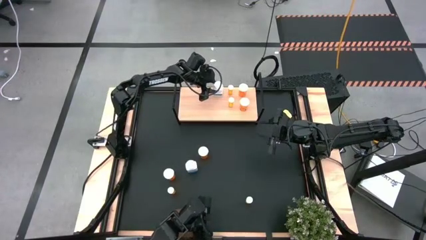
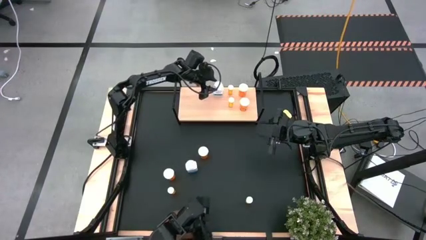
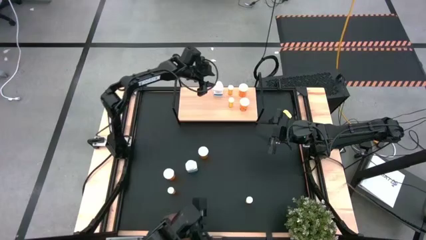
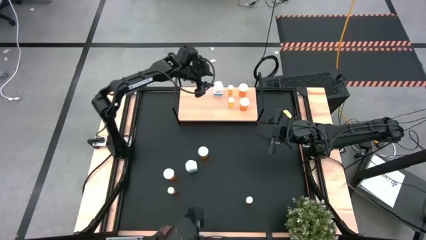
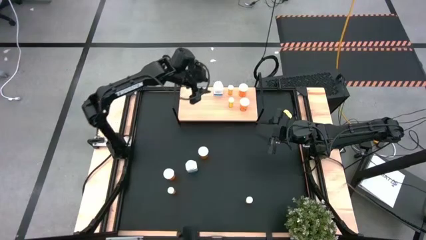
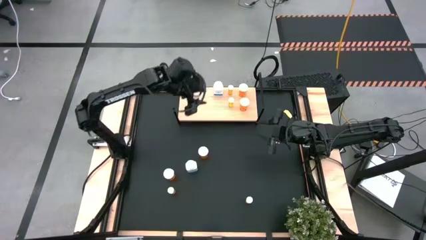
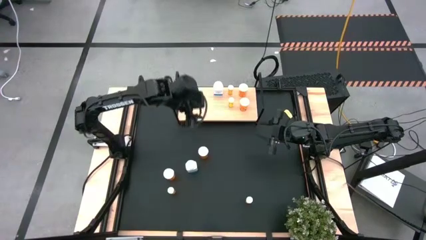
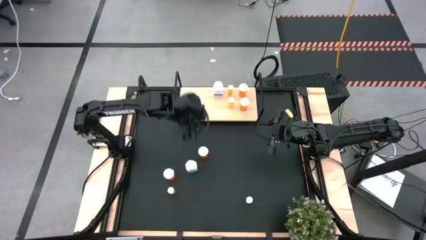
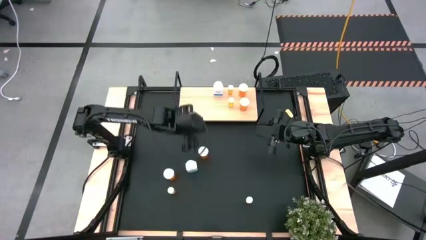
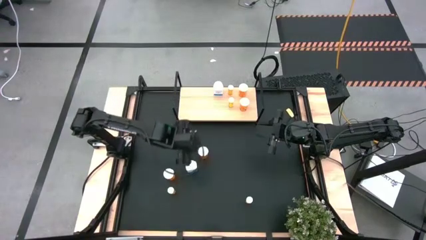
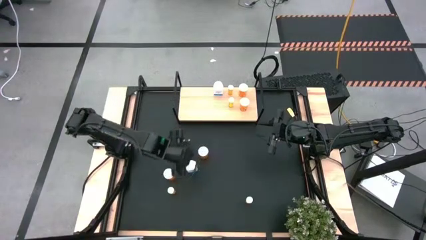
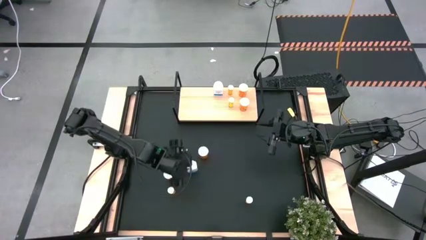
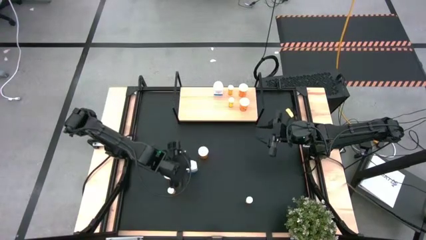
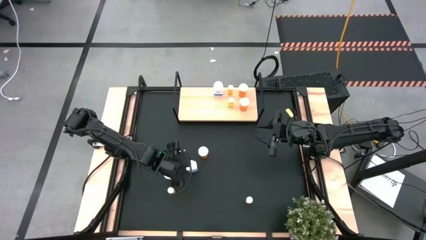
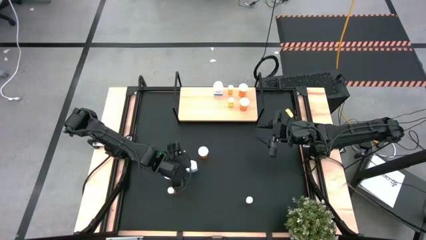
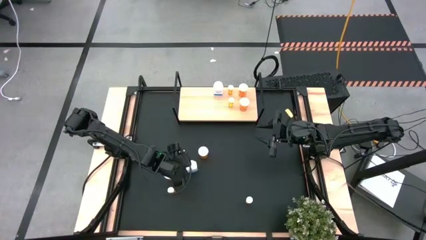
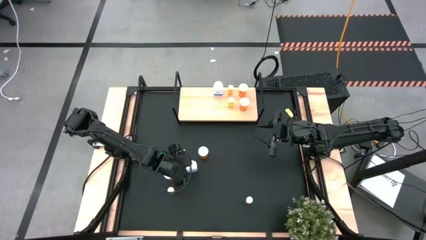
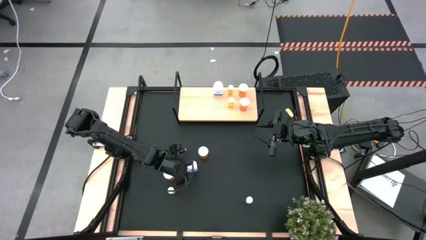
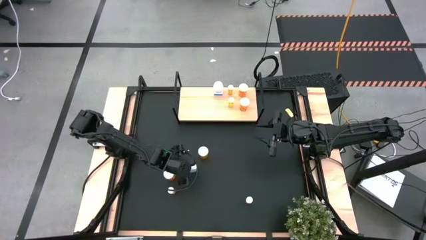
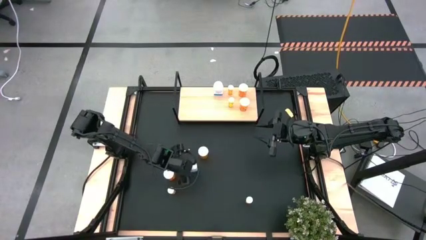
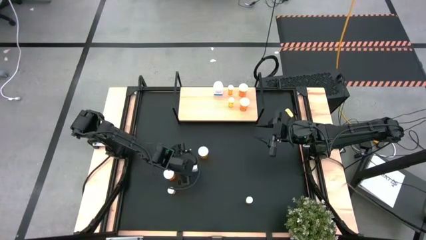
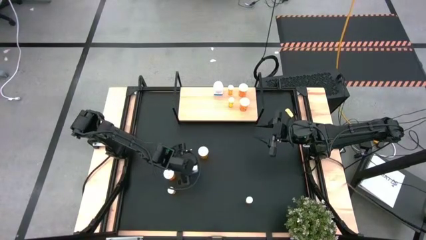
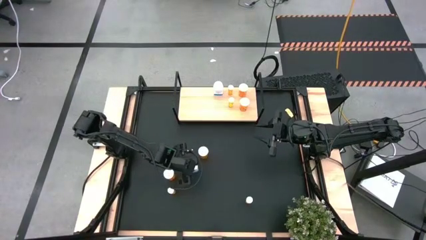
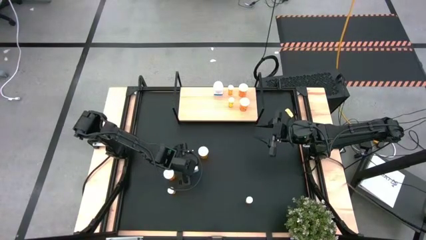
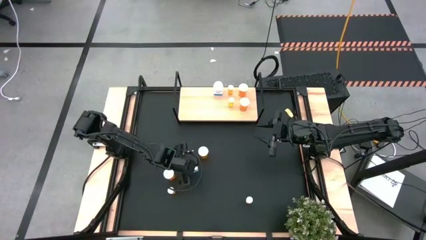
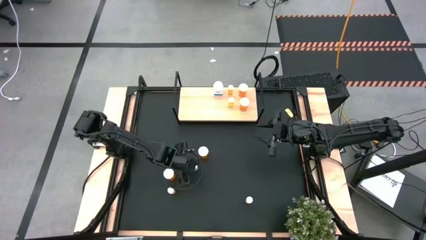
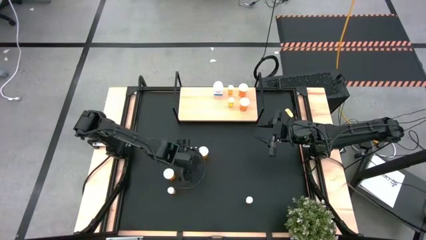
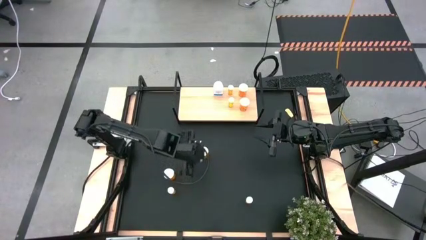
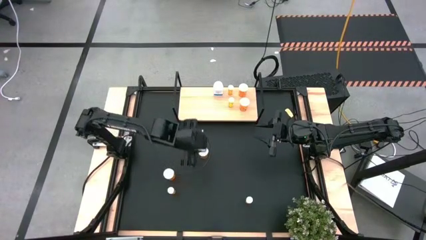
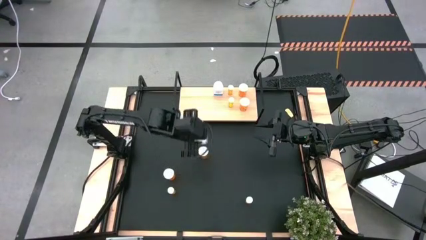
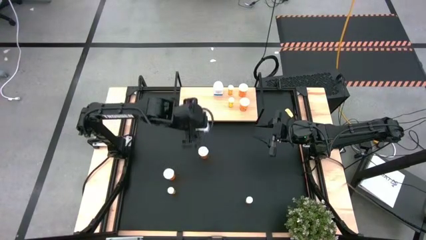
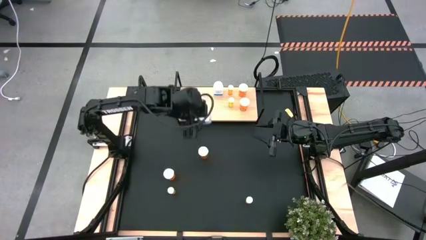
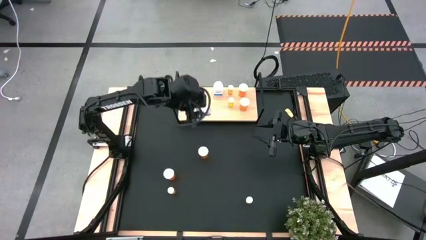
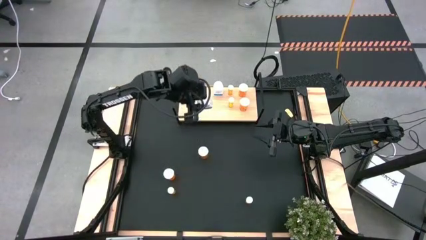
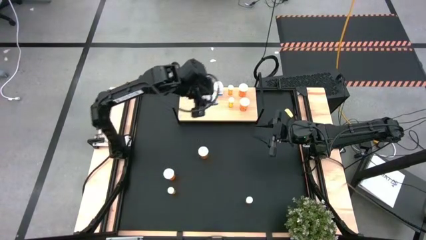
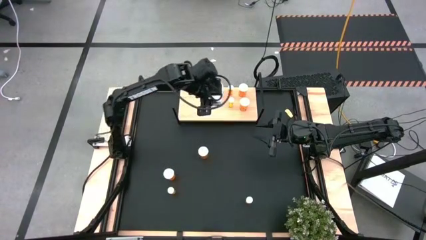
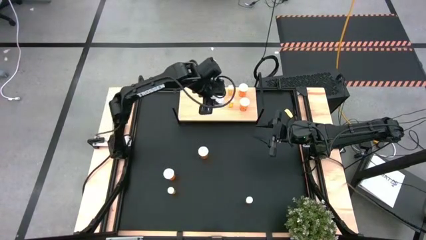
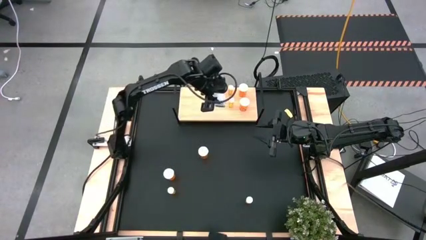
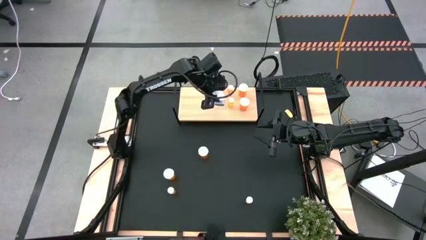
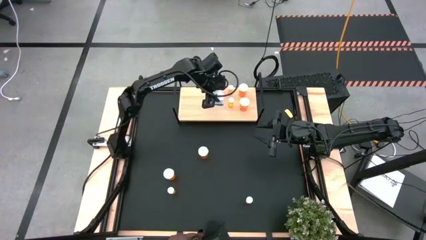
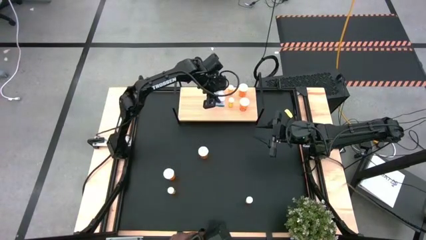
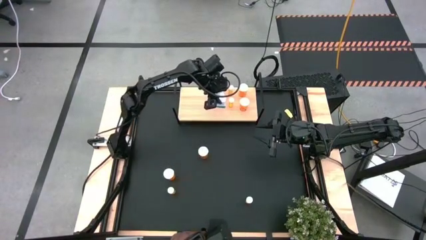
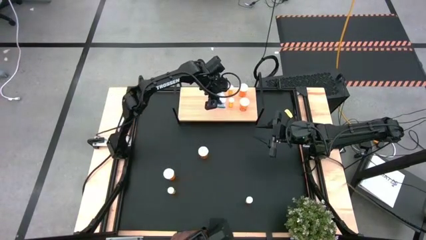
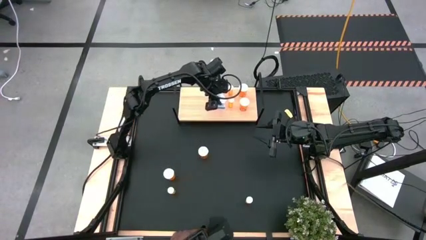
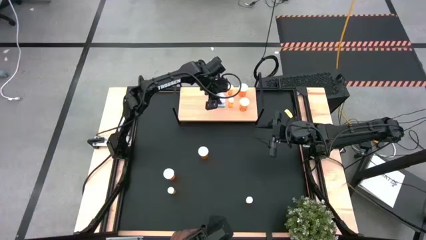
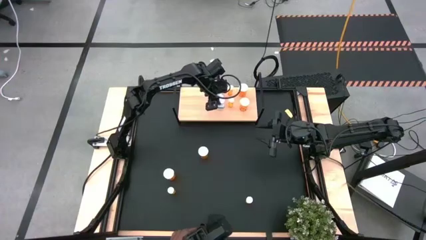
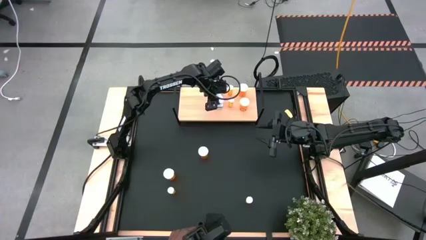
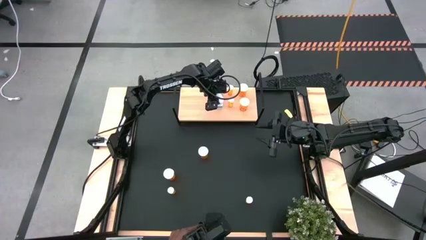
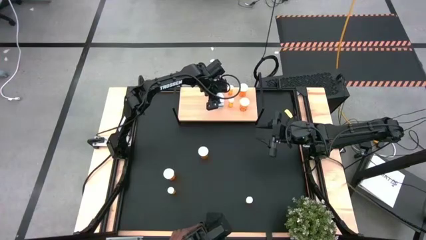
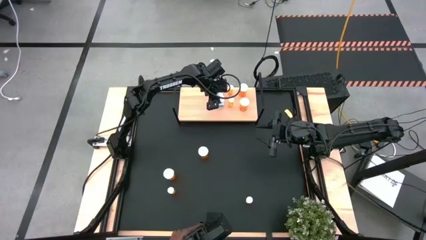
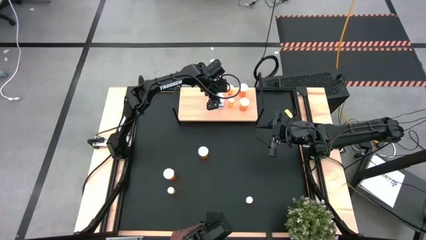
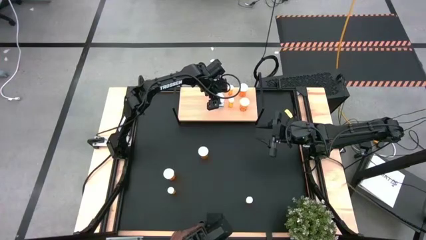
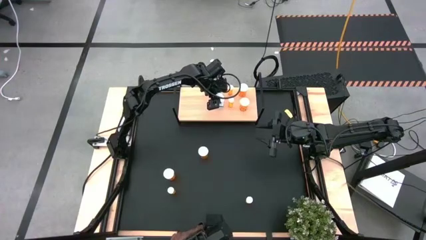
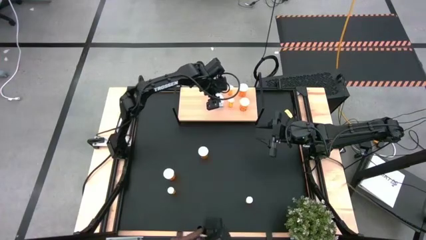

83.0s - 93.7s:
Task: Pick and place medicine bottles onto shelf by color
Put the white pill bottle aligned with the other white pill bottle on the shelf

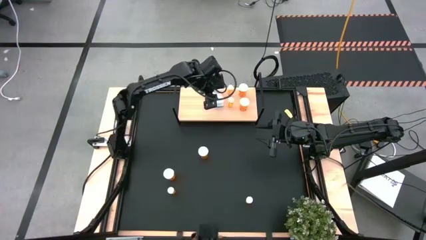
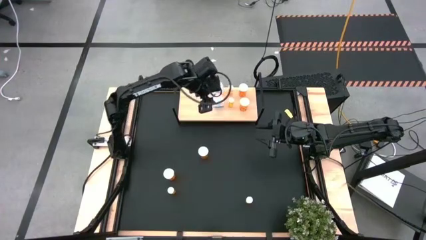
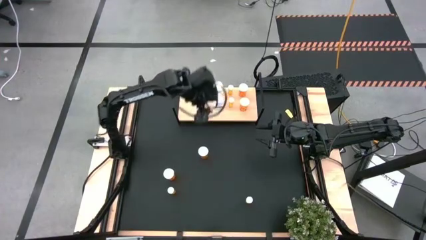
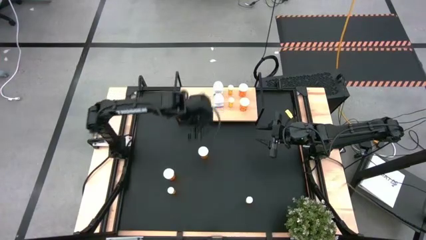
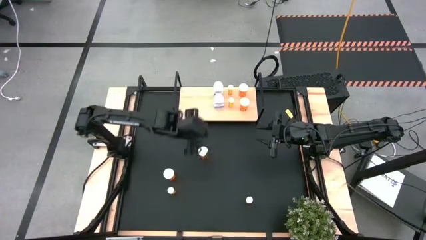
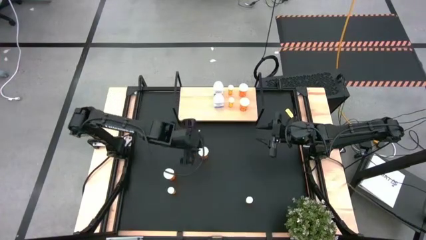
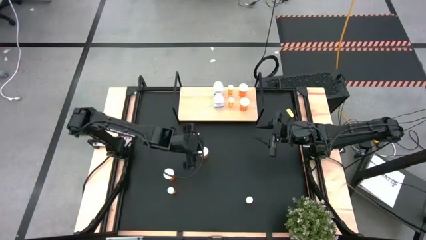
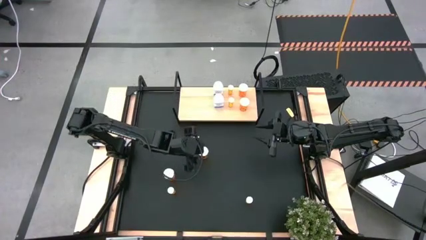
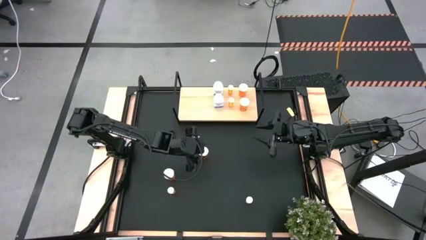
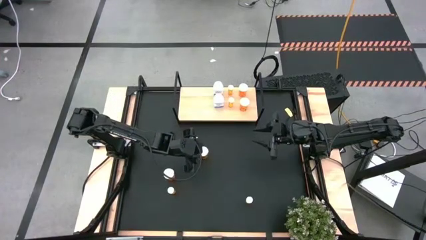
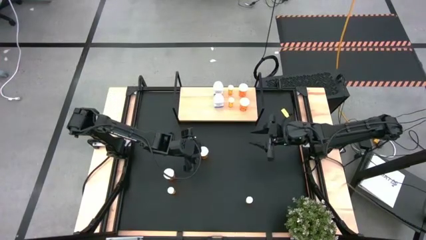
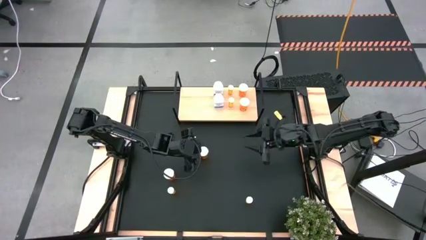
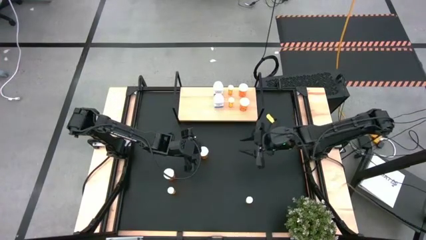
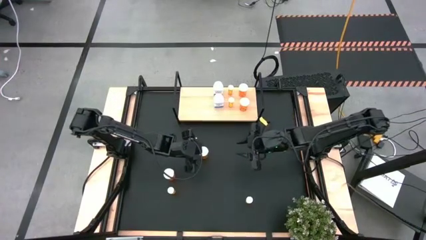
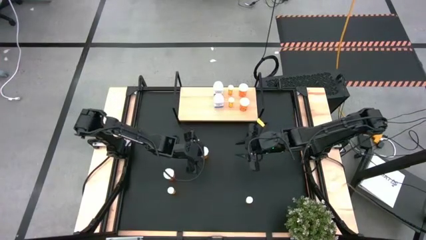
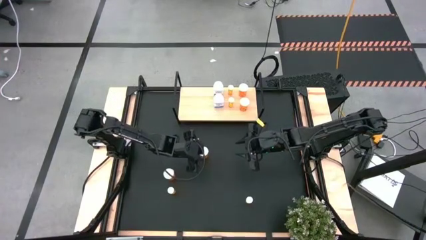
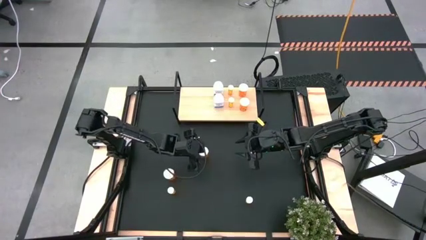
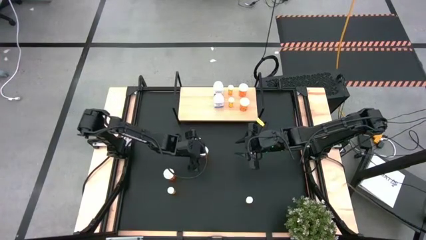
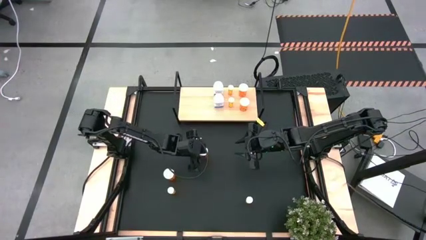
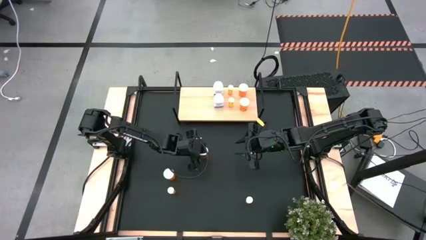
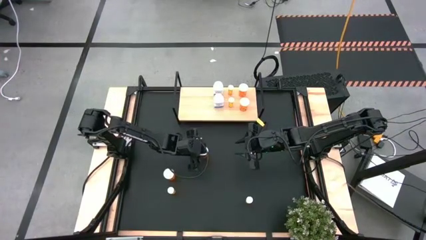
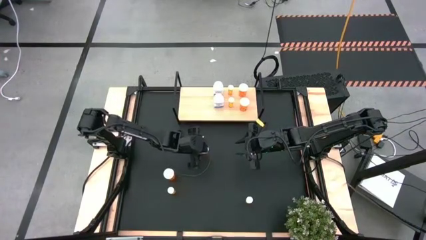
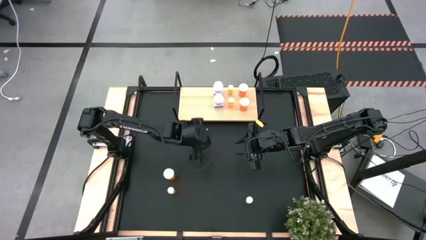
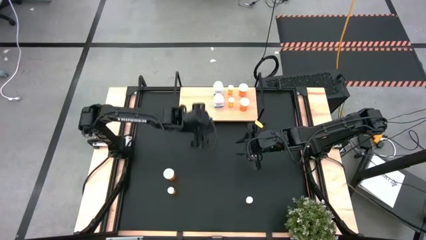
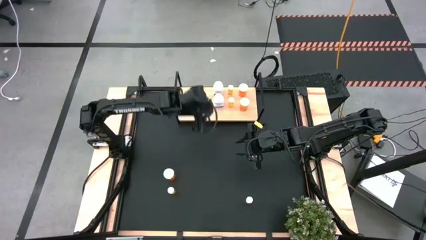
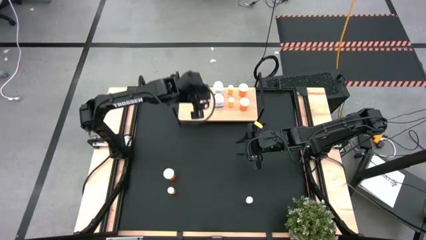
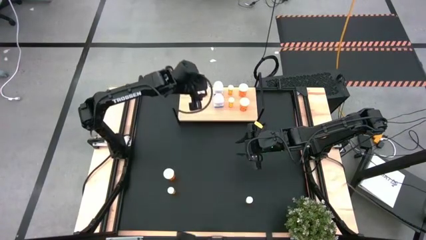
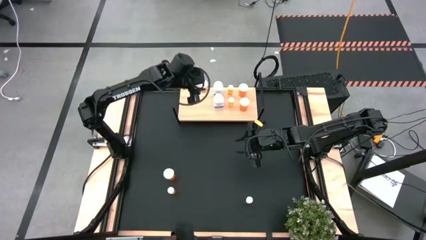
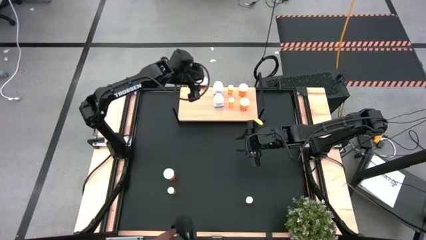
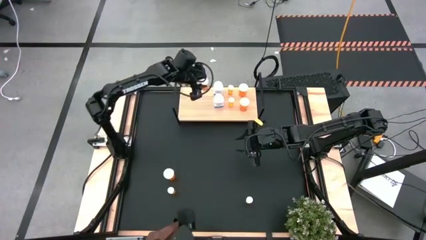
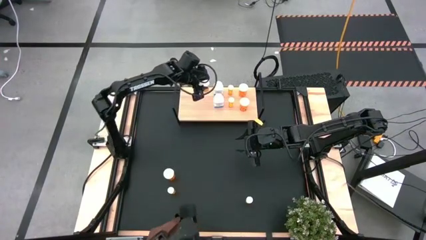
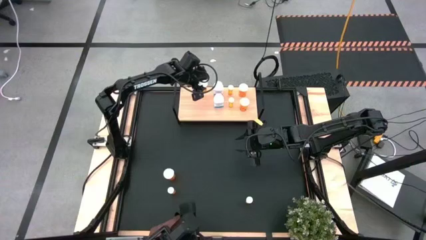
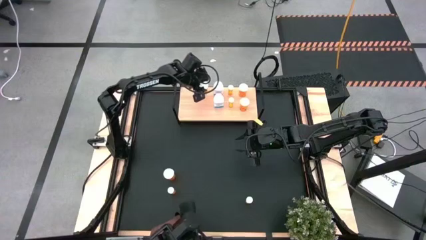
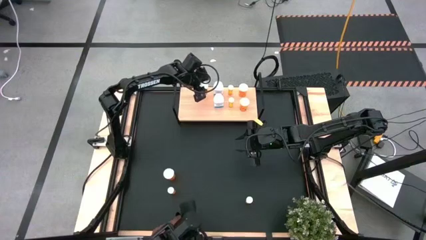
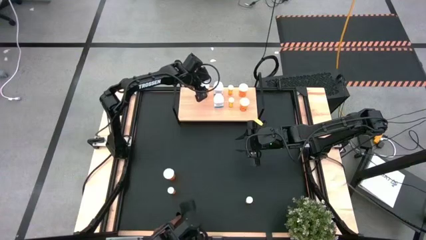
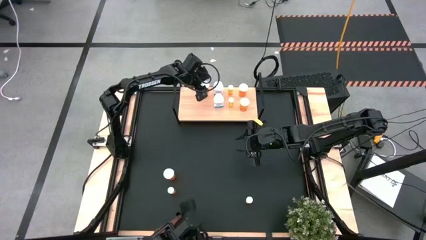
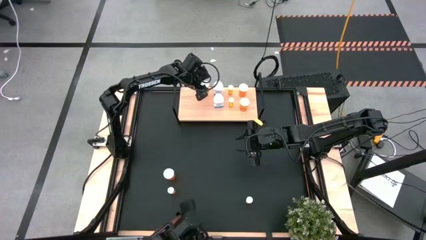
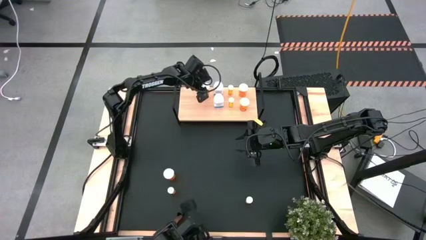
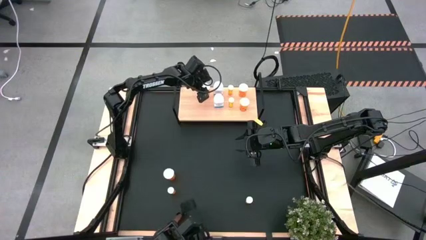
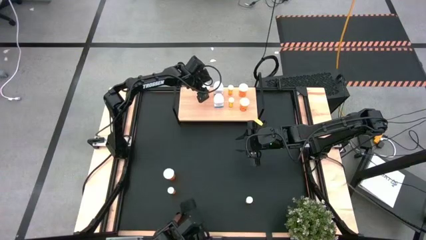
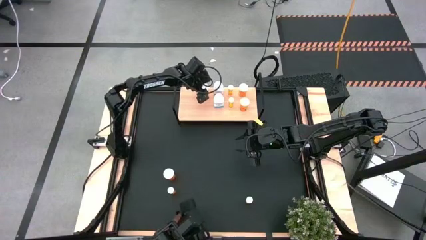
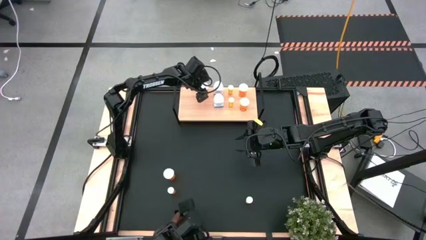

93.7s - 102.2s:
Put the top big orange pill bottle on the shelf
